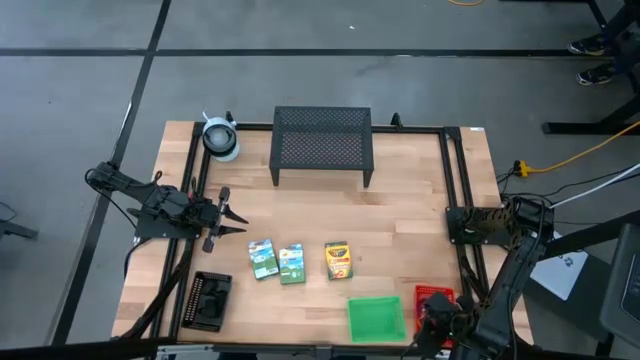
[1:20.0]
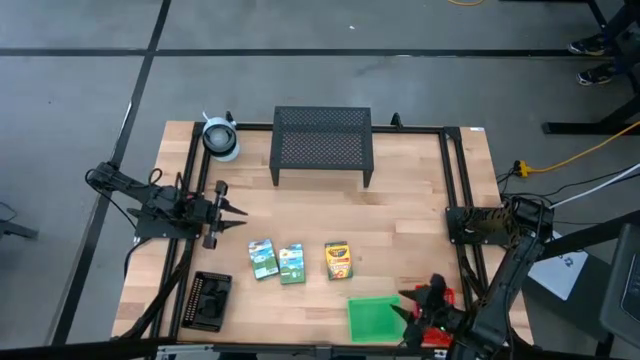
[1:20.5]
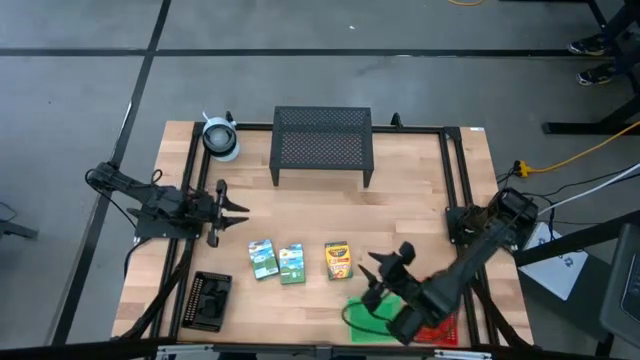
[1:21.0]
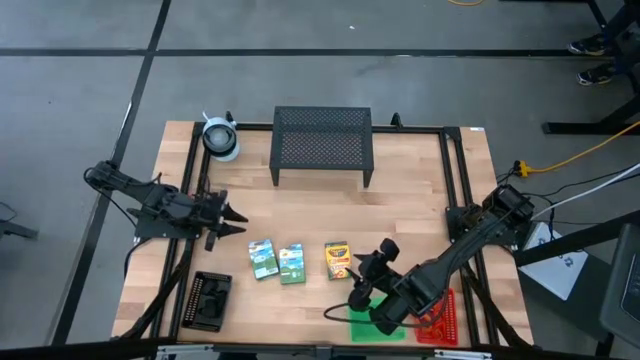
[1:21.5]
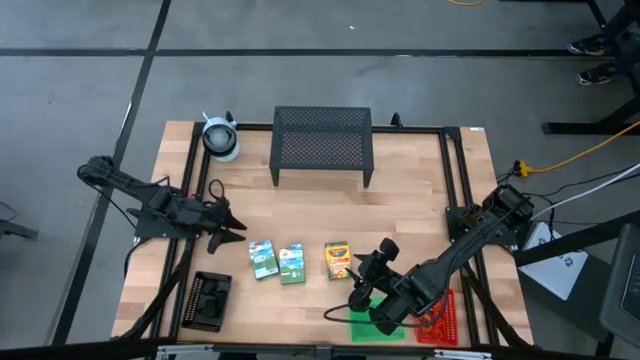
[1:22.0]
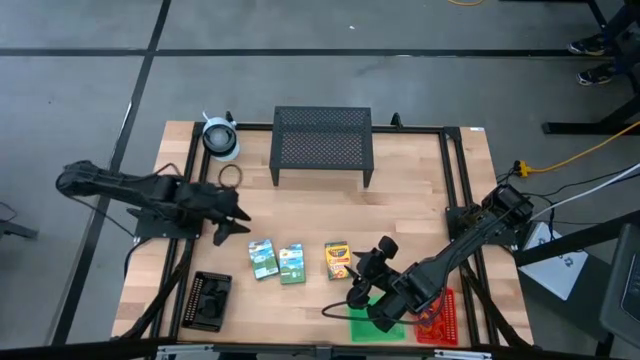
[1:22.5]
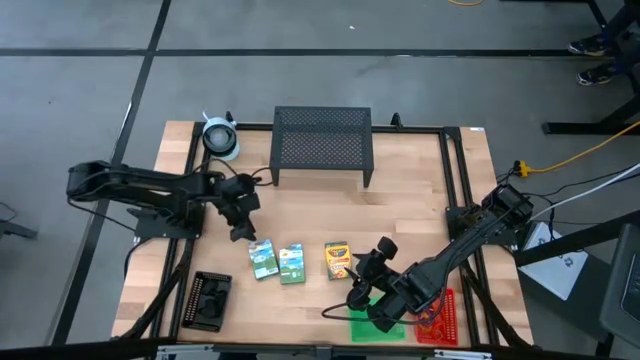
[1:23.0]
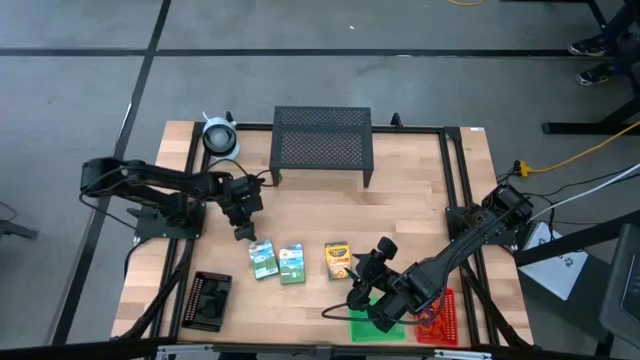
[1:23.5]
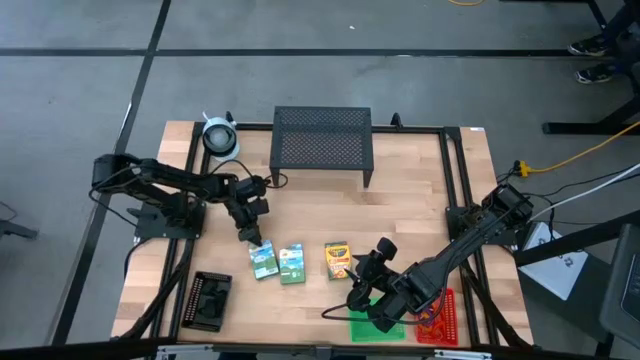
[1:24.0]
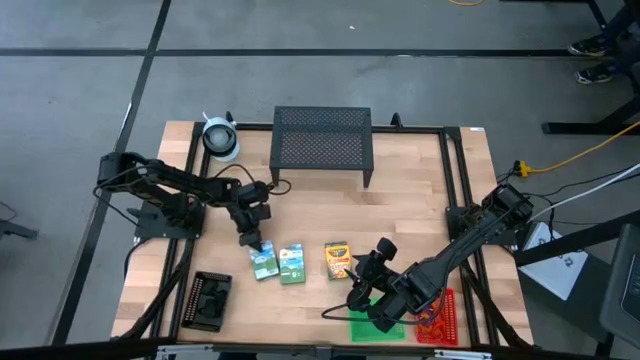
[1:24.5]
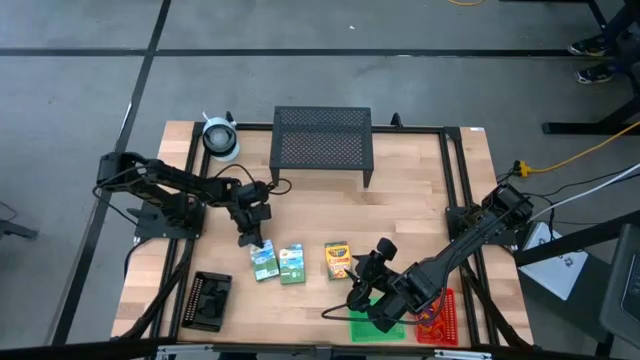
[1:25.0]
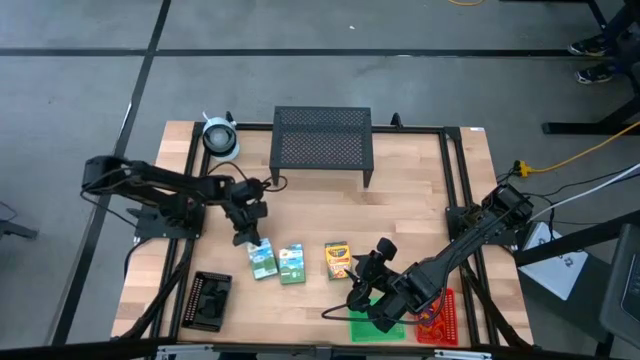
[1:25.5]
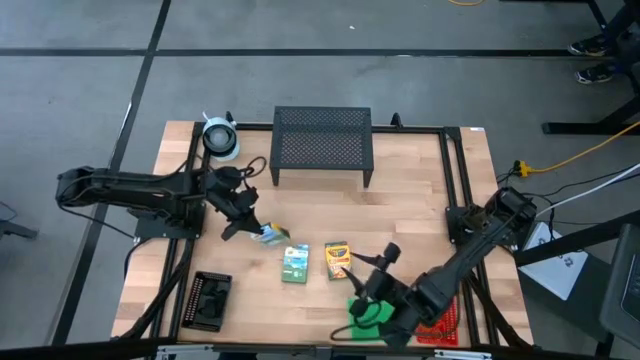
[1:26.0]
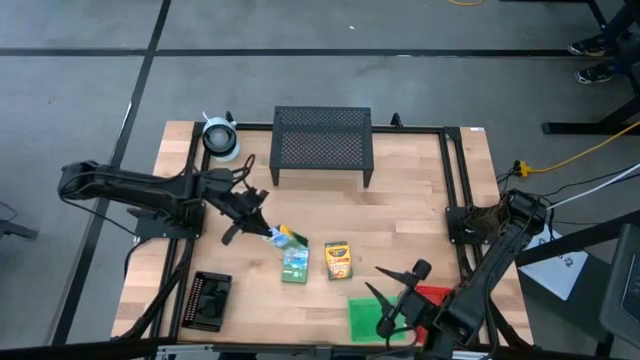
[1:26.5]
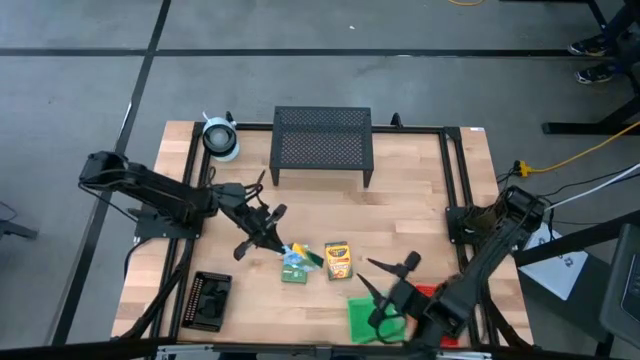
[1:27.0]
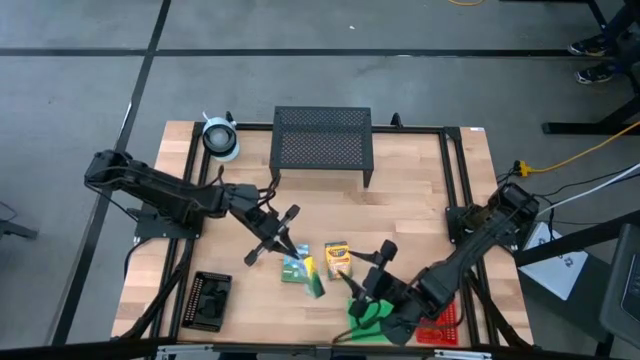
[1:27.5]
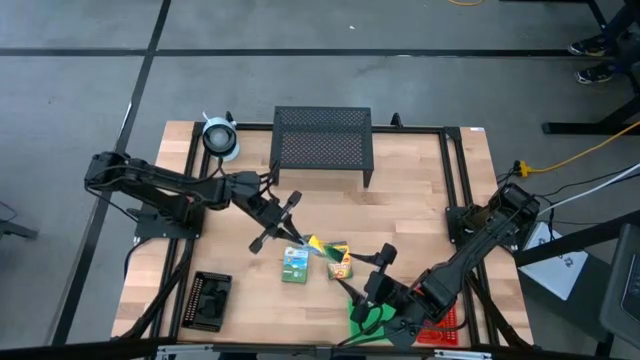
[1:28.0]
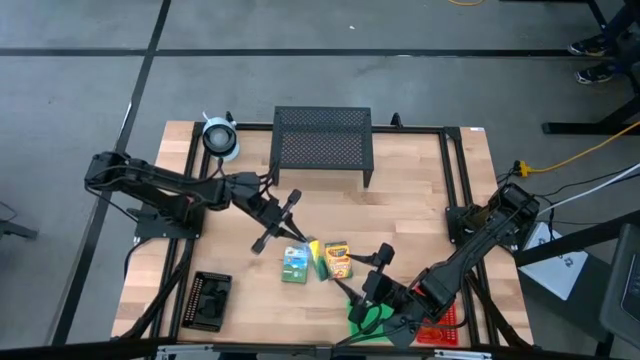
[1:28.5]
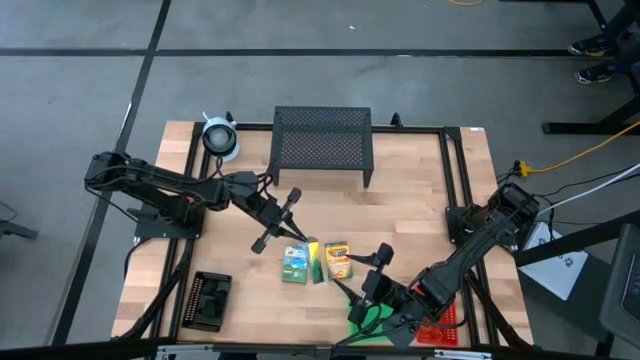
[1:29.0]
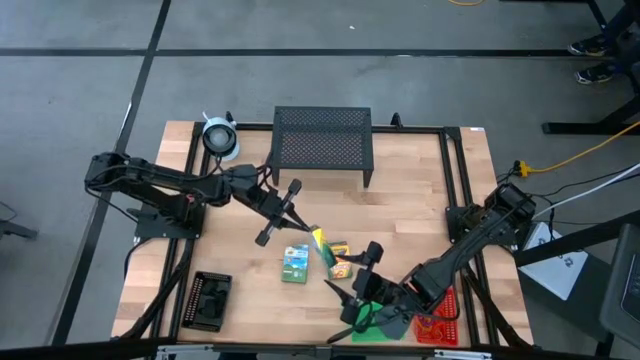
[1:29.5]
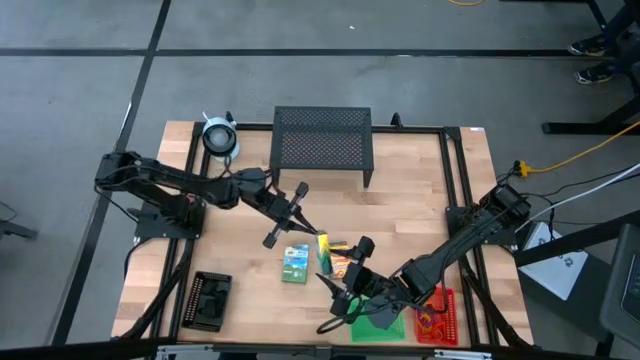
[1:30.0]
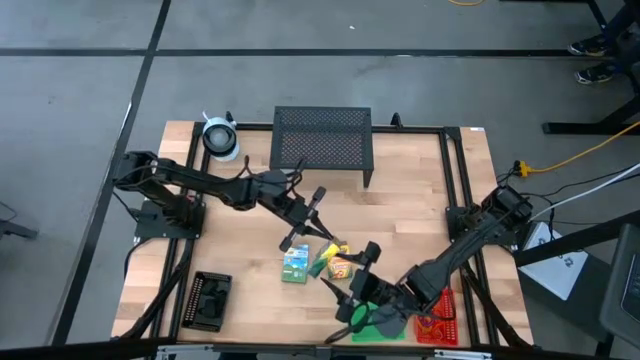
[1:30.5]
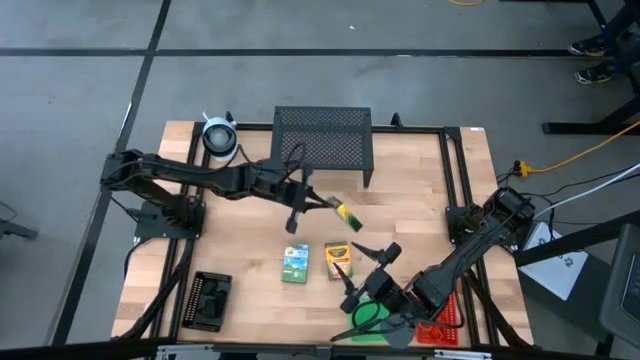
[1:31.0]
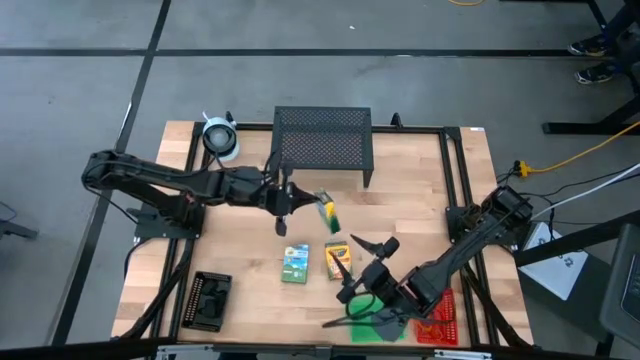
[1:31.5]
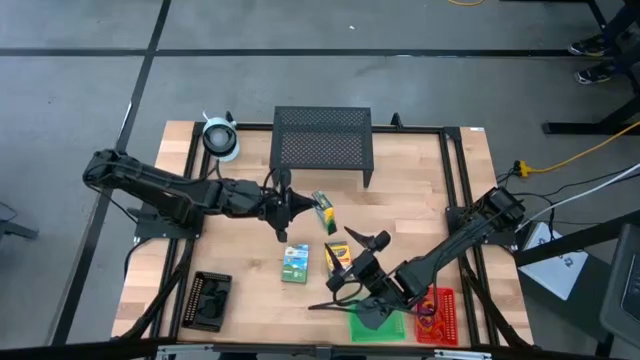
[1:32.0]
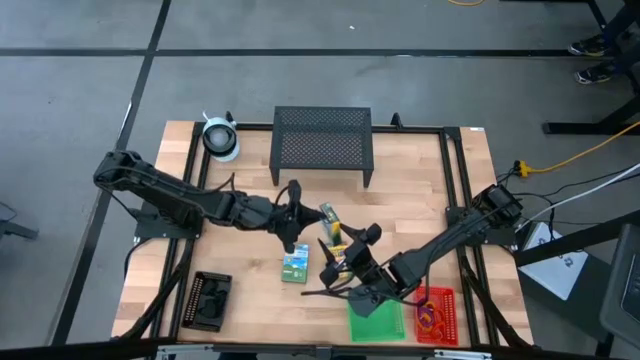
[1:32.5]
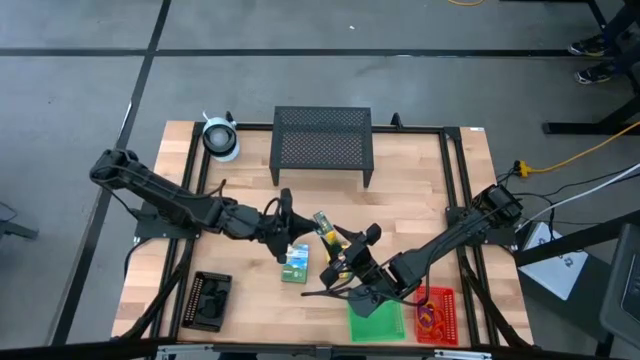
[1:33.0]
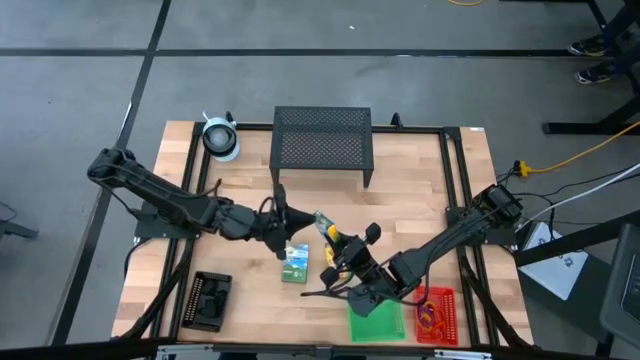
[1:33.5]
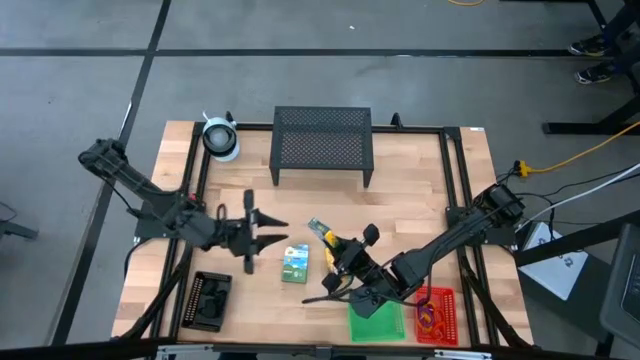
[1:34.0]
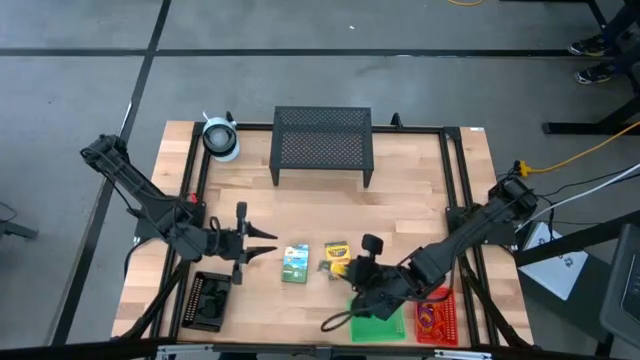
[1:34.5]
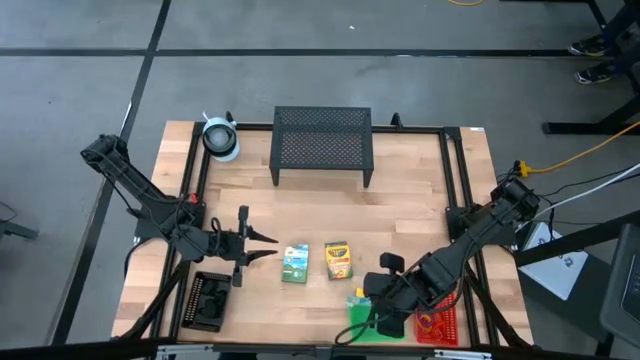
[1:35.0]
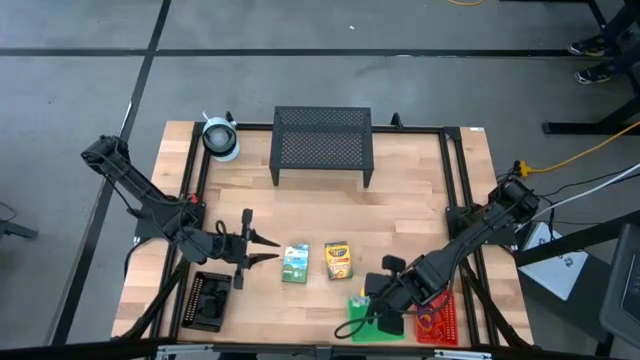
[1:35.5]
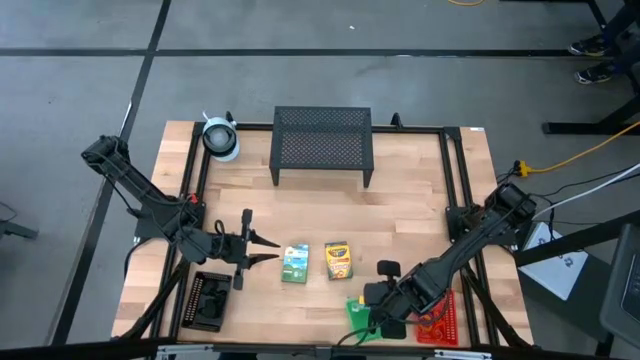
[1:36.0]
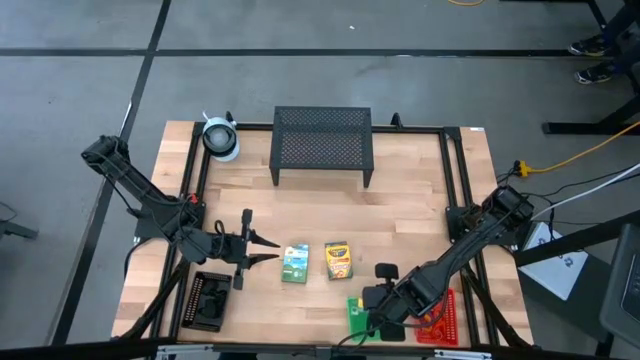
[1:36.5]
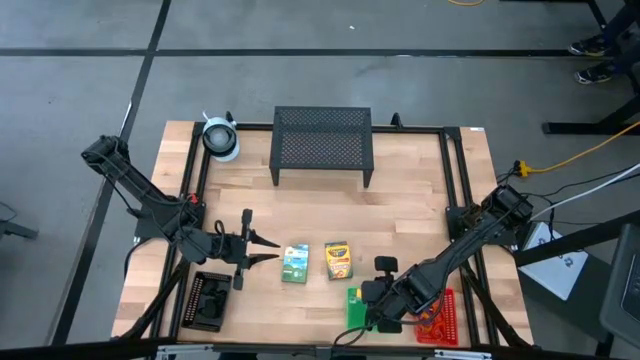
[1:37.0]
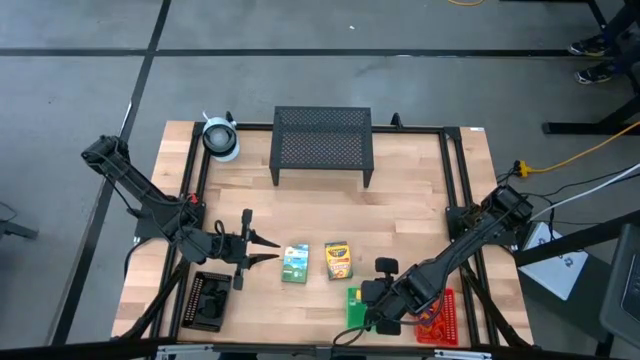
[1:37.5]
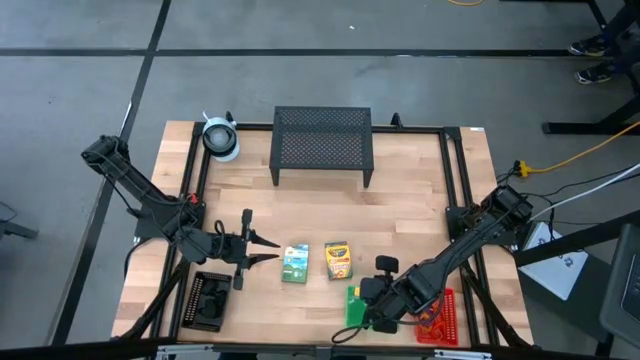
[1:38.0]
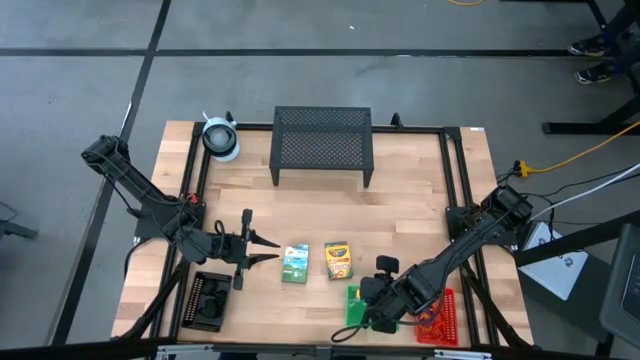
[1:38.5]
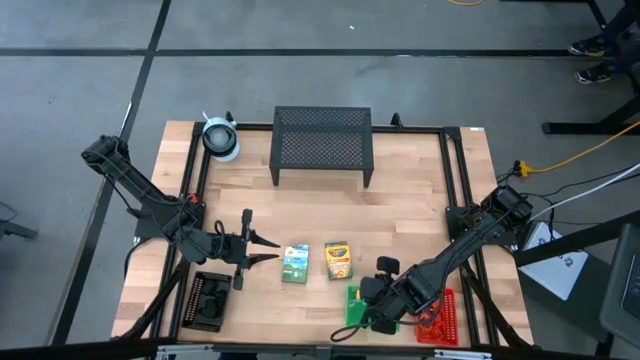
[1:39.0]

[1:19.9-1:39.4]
Task: Pick & Place Office Desk Supplies
Put the yellow green crayon box into the green bin

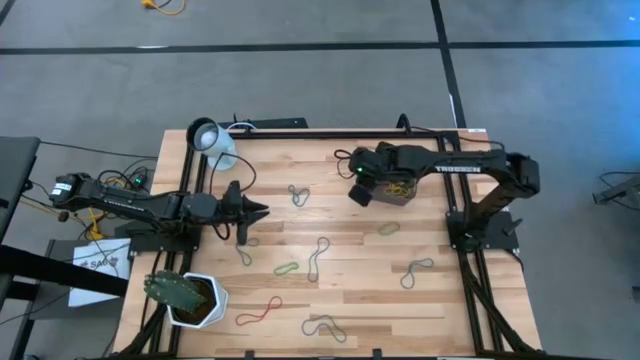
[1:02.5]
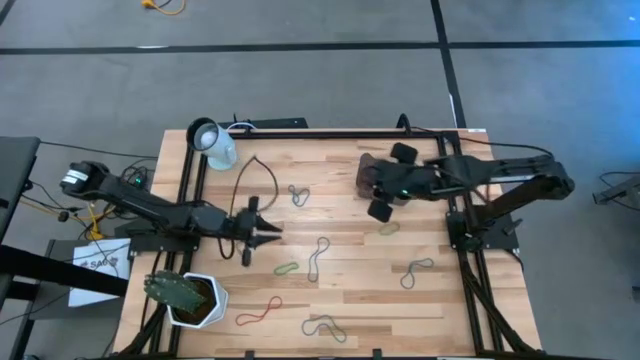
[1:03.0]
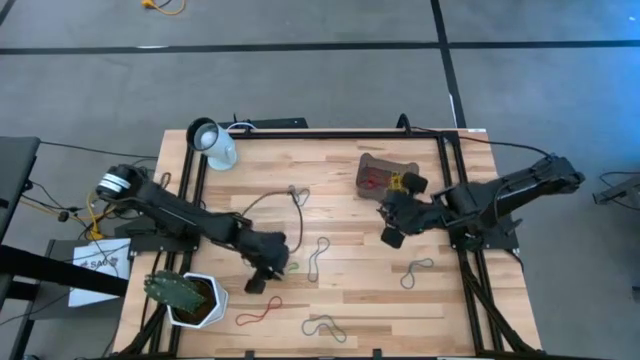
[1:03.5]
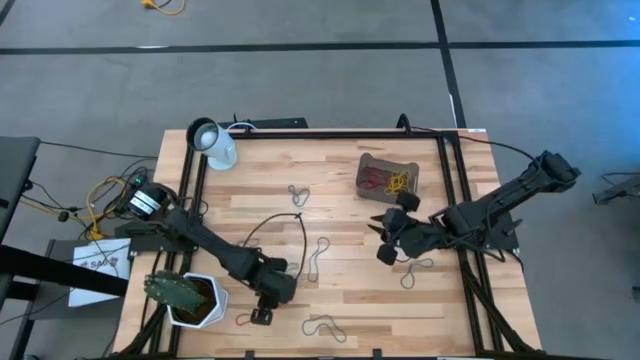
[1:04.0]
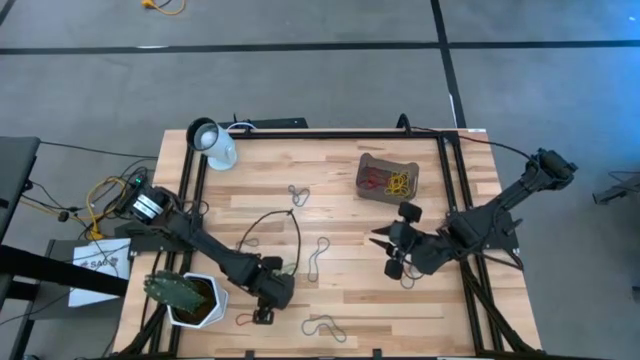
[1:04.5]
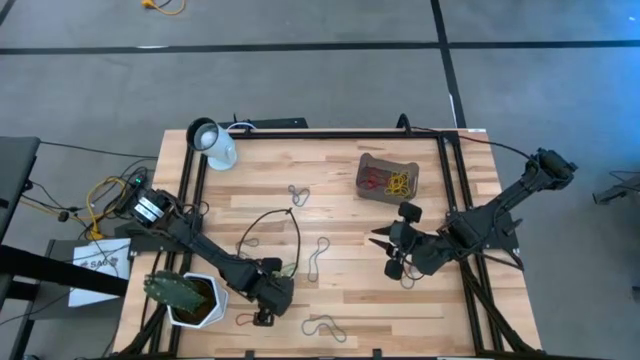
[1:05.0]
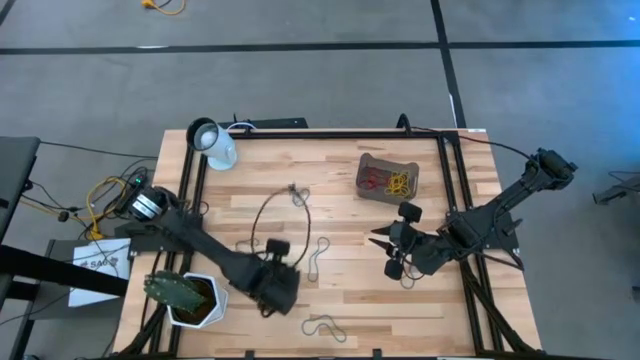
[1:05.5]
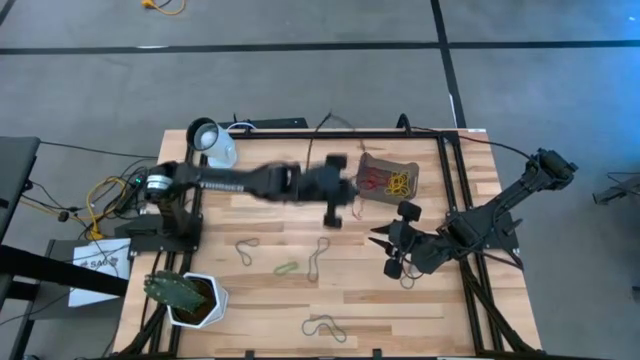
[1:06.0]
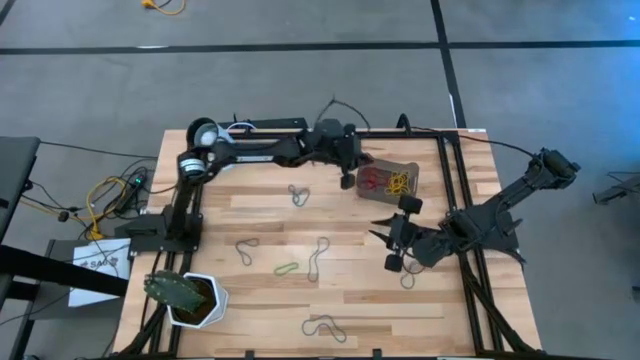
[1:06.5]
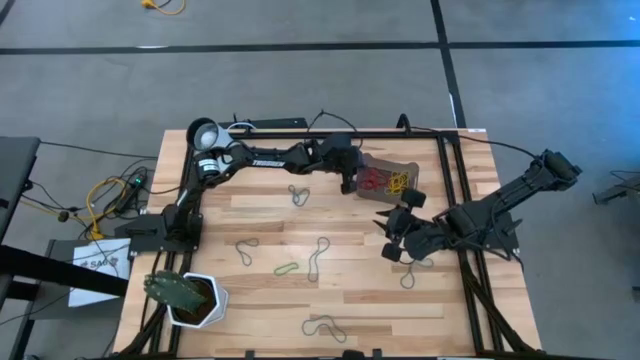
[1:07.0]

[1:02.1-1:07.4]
Task: Pick and place rubber bands into bin
Put the red rubber band into the black container
